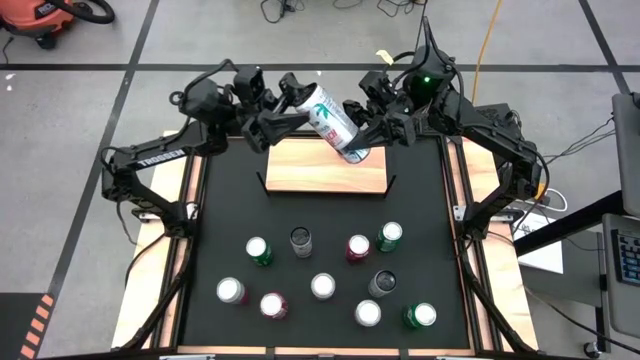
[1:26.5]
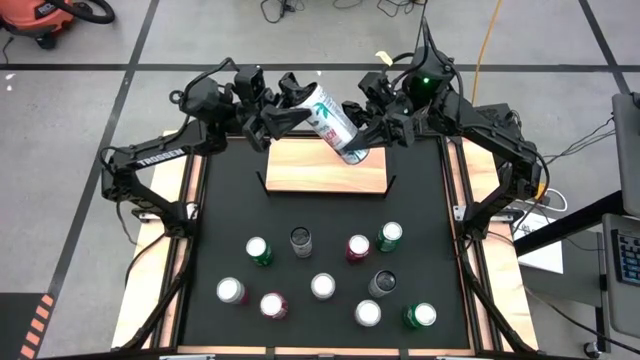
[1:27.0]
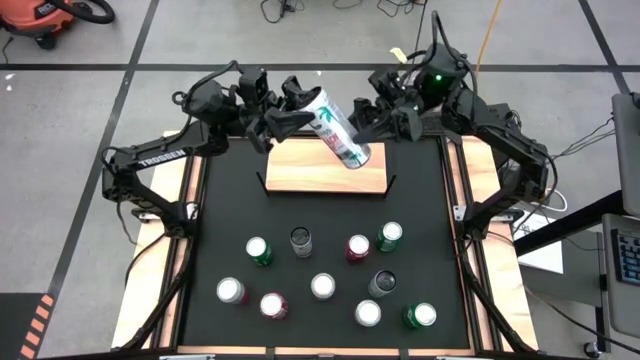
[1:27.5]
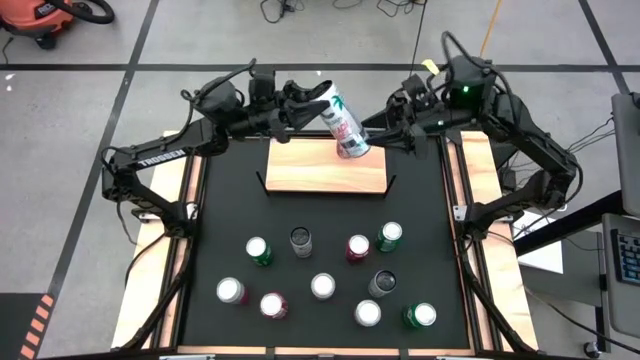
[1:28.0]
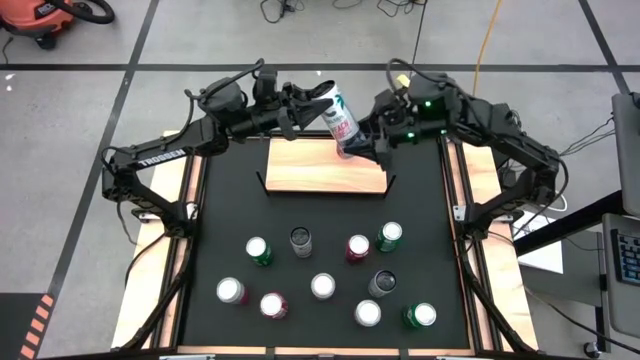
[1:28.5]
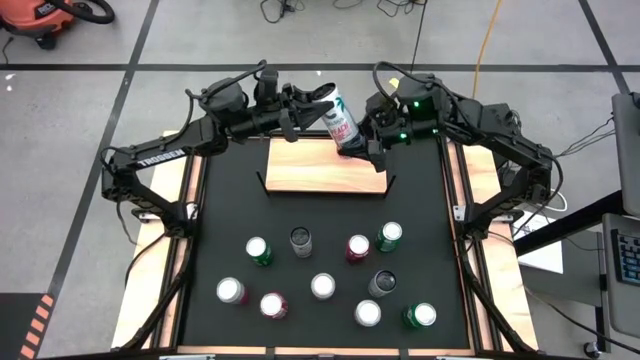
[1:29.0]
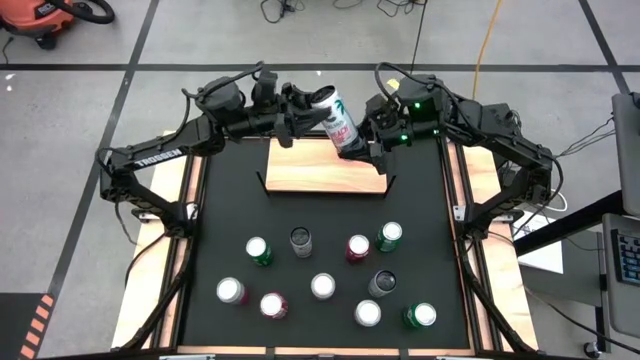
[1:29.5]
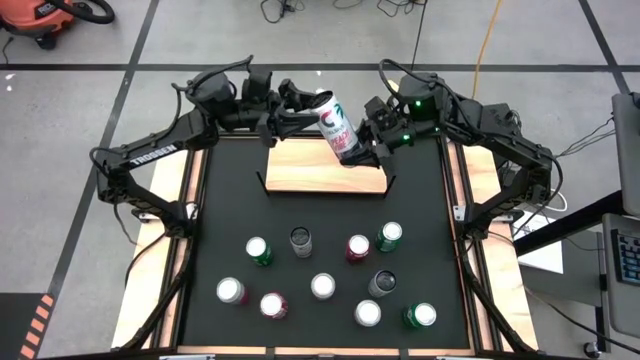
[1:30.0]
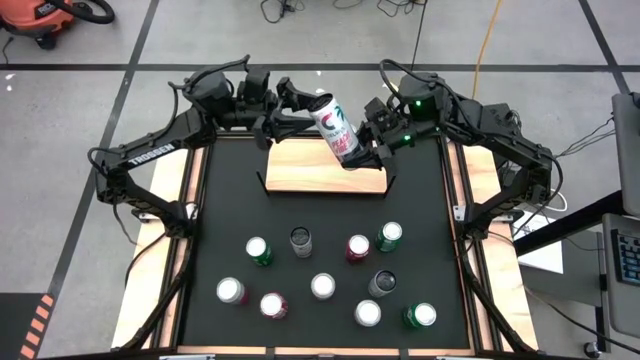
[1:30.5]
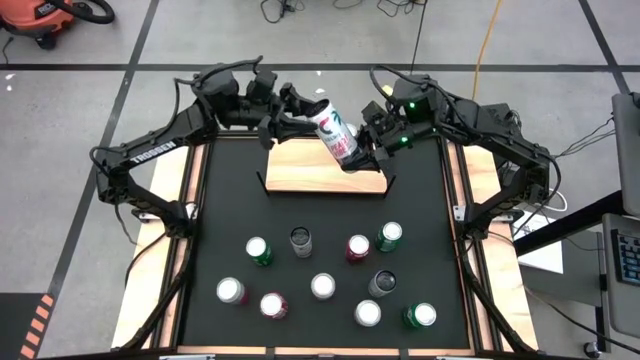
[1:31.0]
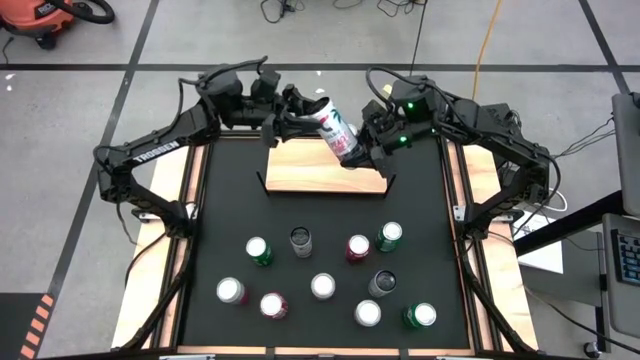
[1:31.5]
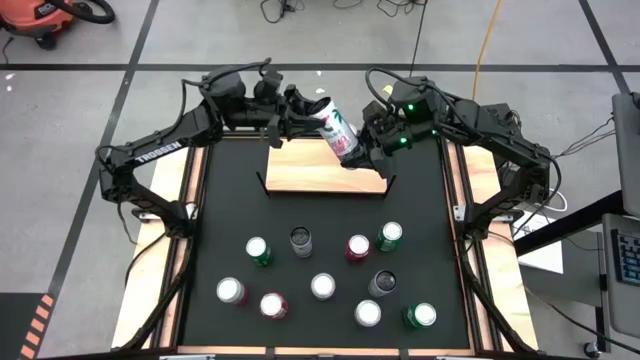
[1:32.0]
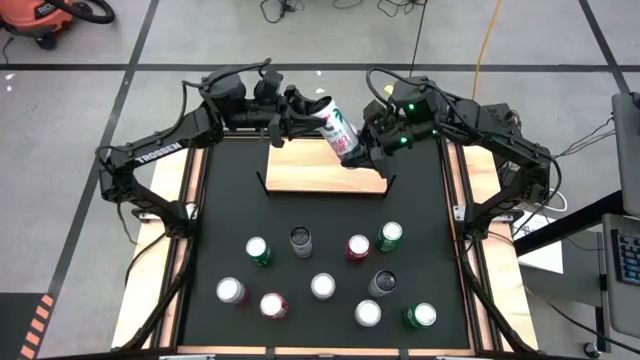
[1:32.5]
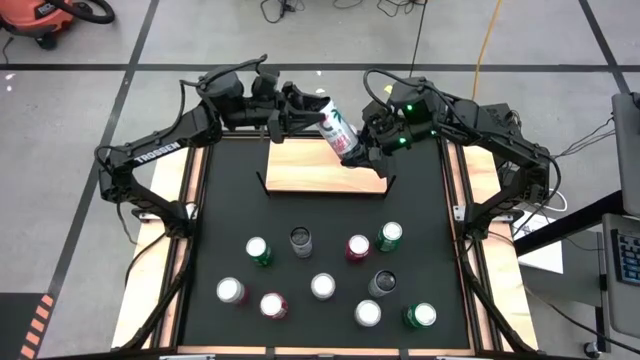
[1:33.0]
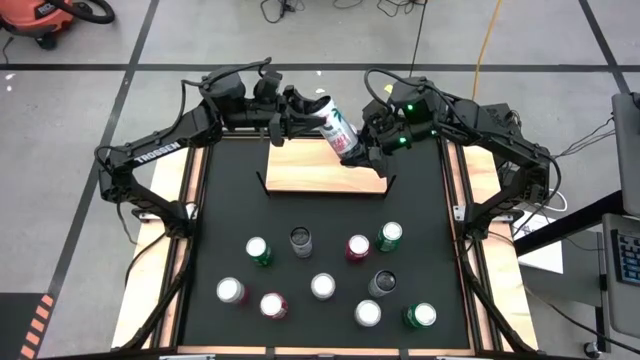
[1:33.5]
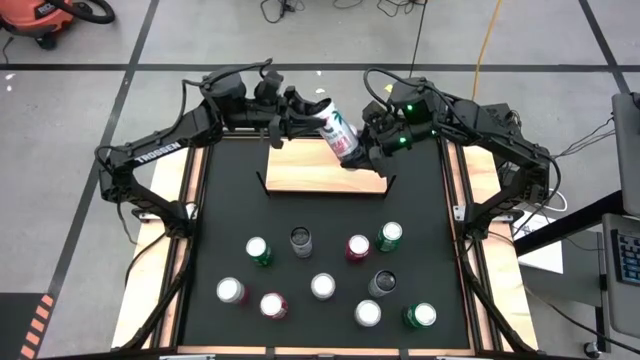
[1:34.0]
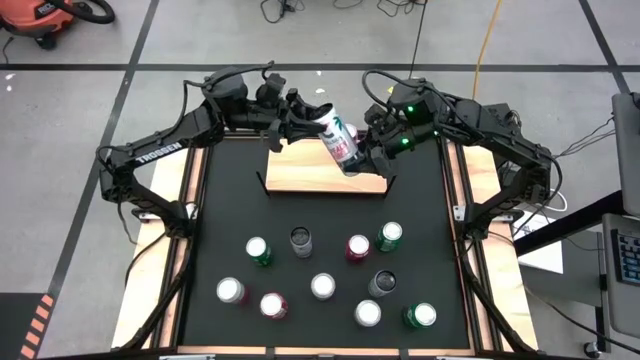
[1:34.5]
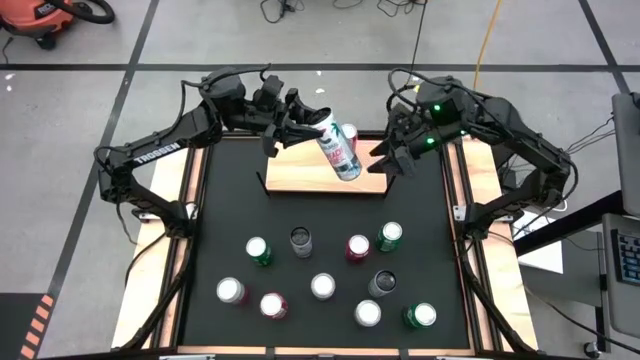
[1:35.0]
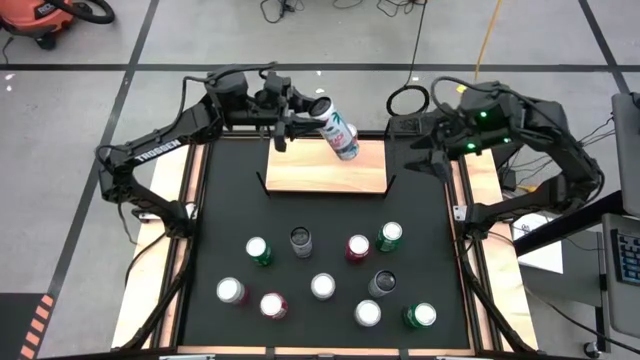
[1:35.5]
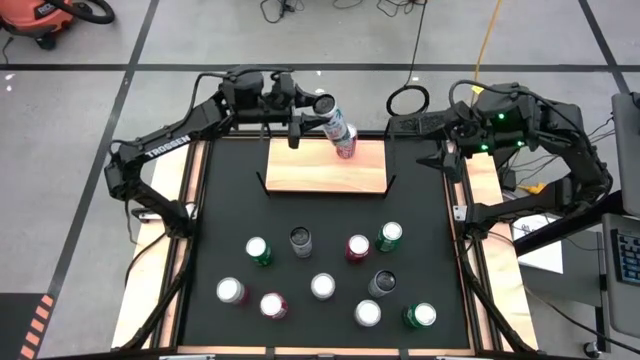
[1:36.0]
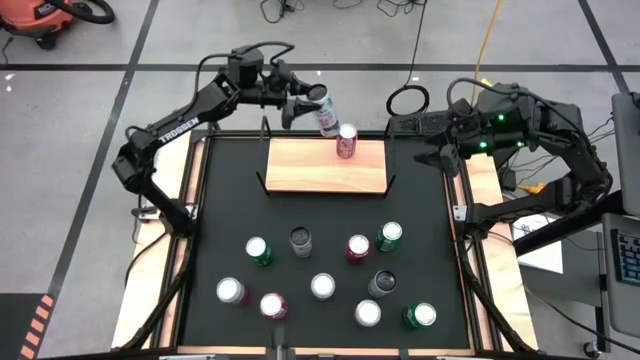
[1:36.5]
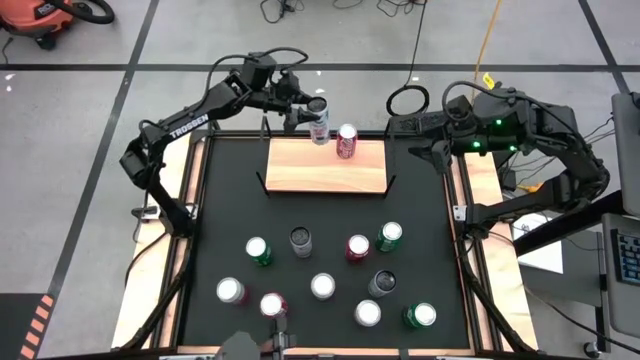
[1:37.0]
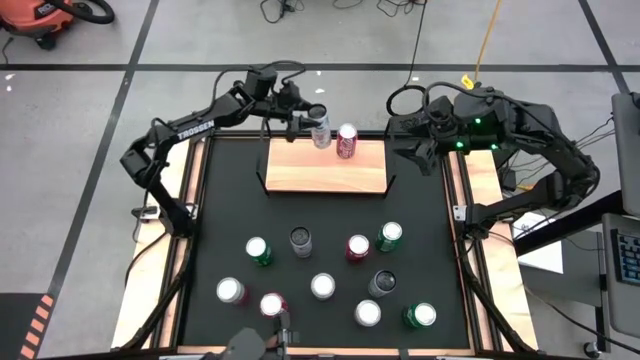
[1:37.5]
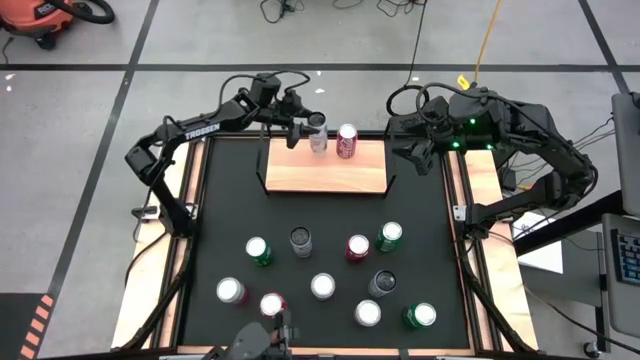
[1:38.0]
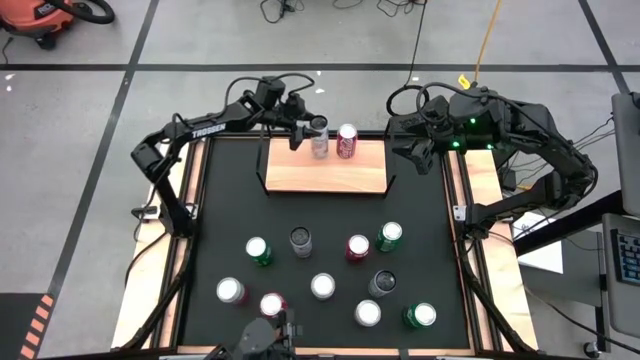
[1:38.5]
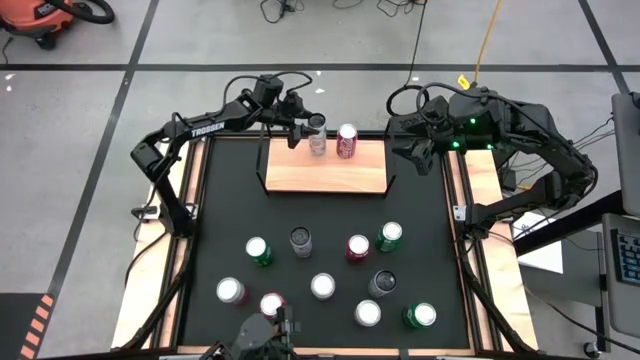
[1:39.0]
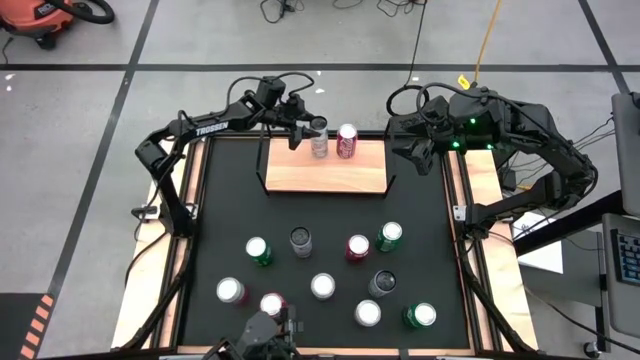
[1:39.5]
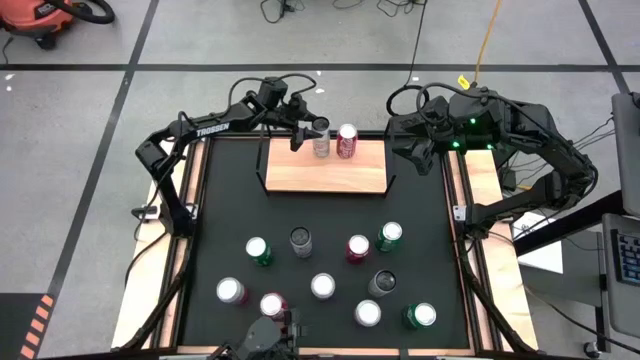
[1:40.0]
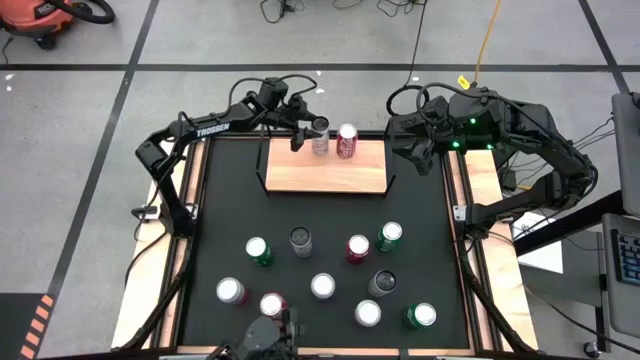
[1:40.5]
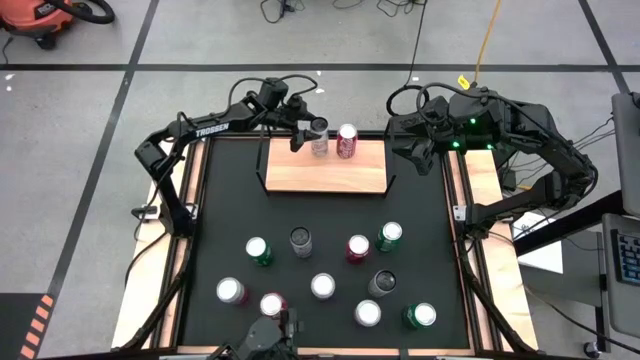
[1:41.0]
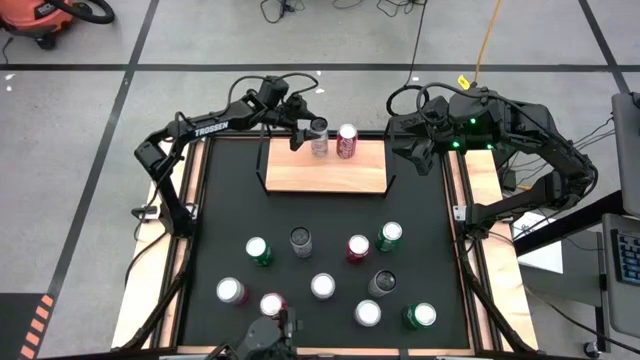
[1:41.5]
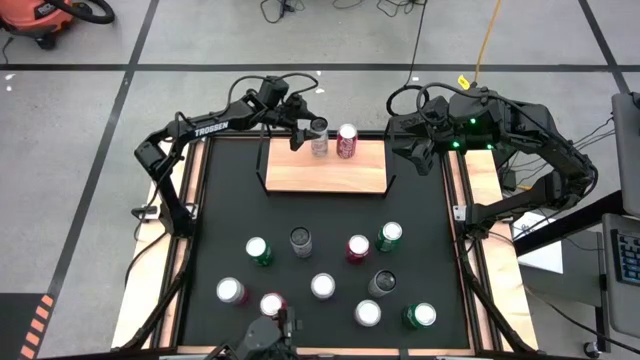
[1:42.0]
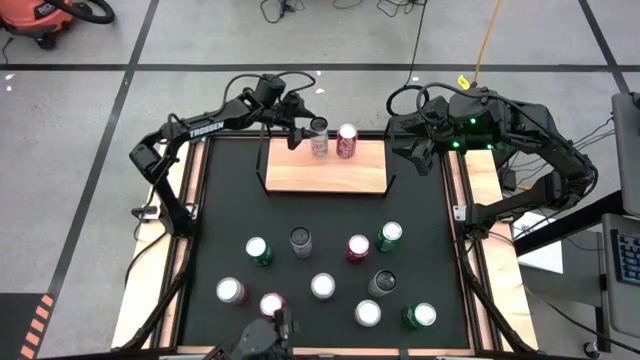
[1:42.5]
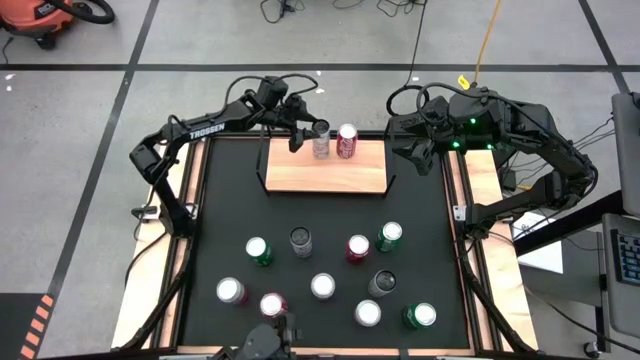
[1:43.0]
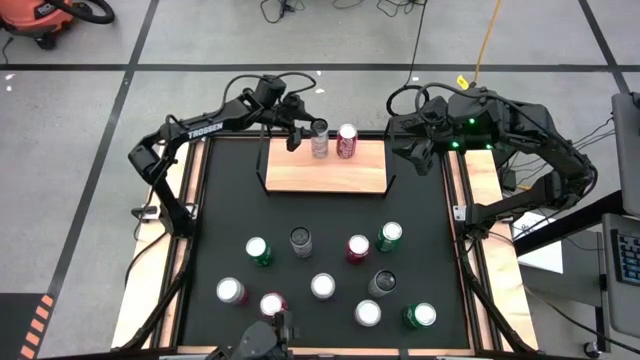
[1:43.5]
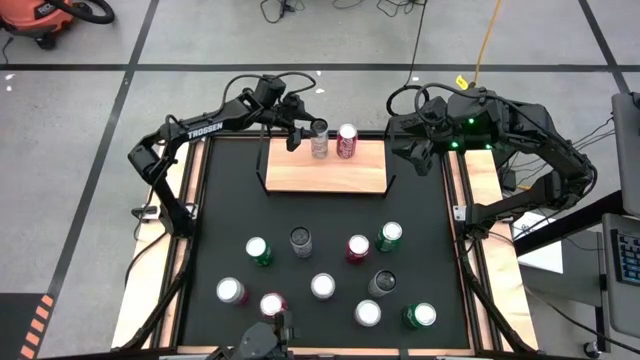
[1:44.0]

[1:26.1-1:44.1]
Task: Place canned beverage on shelf
Put the top right white soda can on the shelf

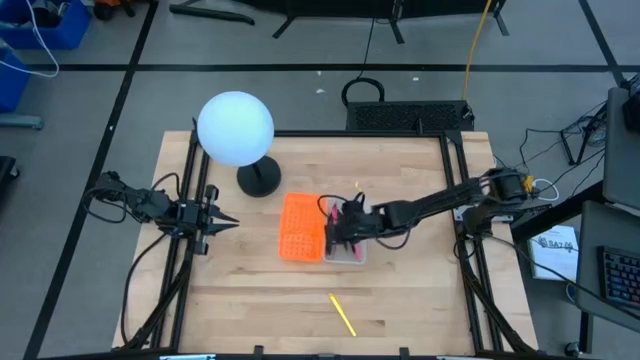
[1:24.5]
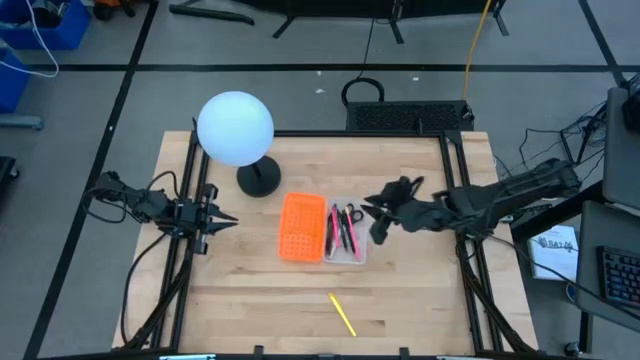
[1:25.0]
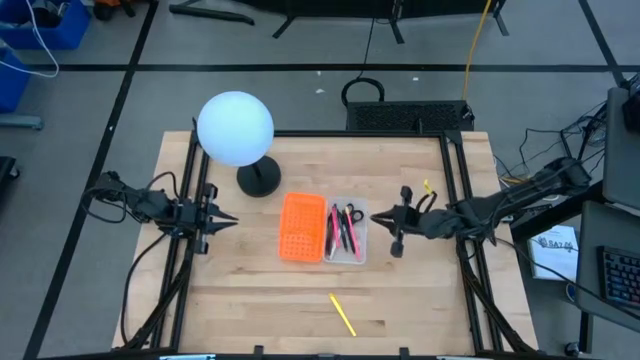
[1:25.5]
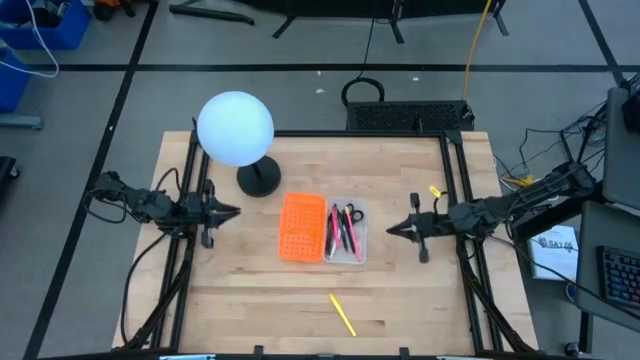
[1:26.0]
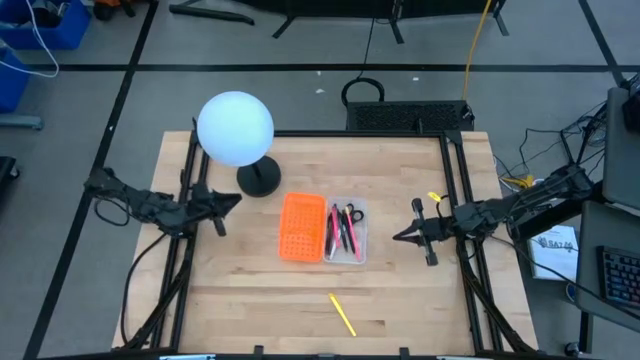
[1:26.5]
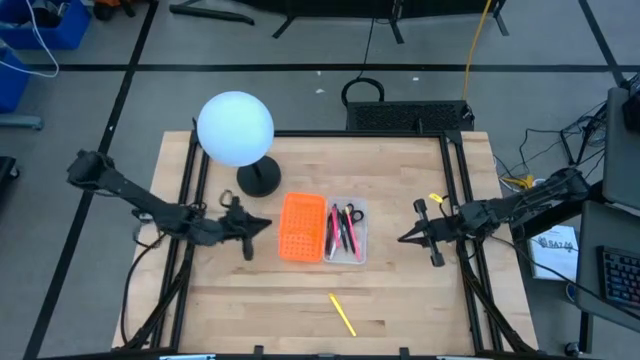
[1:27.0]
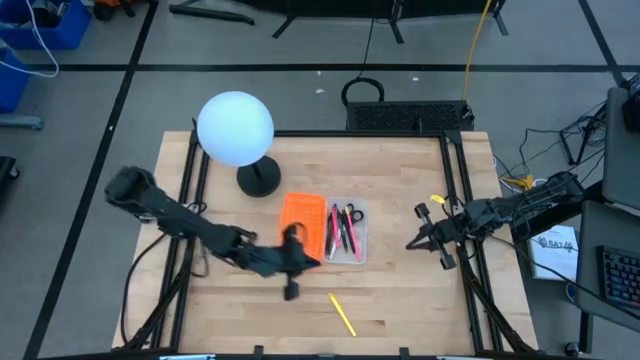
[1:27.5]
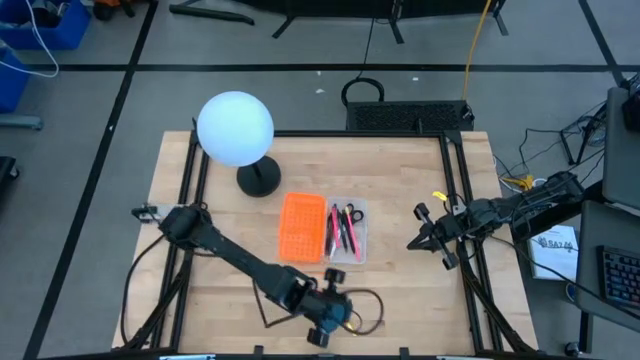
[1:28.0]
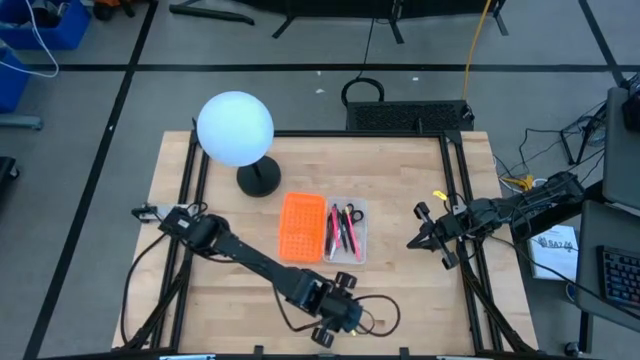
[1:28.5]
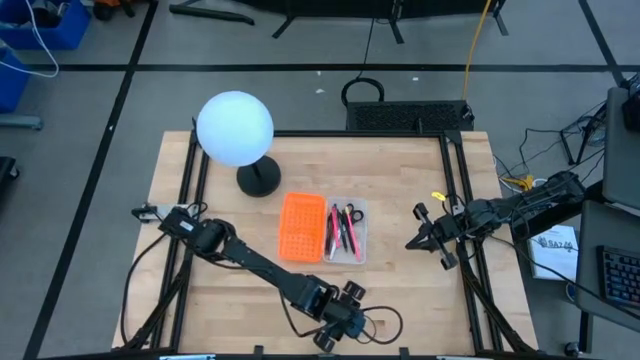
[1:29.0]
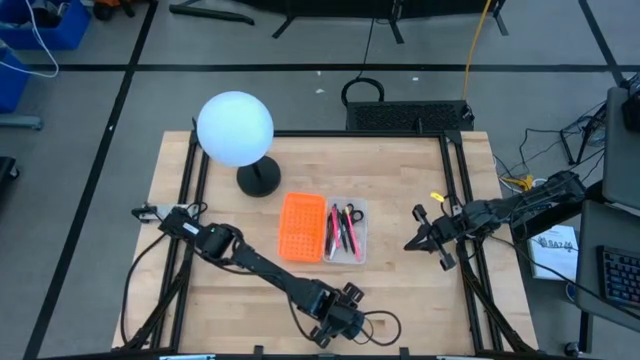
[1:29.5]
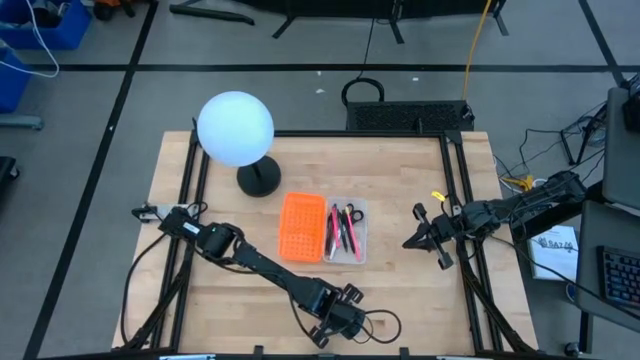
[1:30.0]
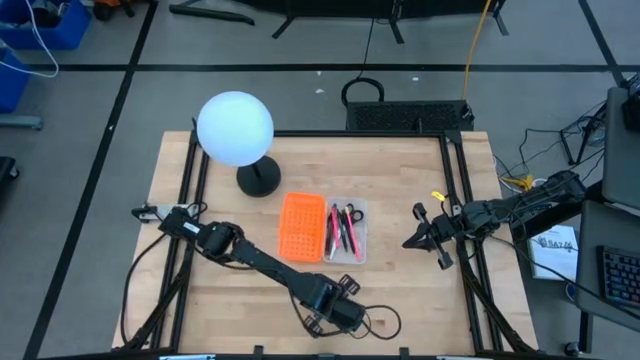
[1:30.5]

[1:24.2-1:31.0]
Task: Pick & place school supplies into a supply box
Put the yellow pen into the orange supply box
